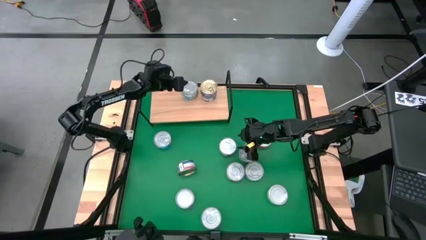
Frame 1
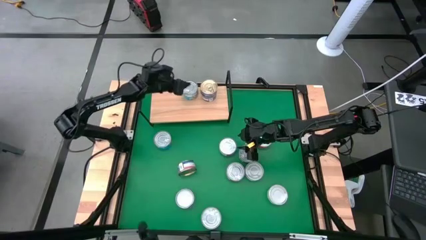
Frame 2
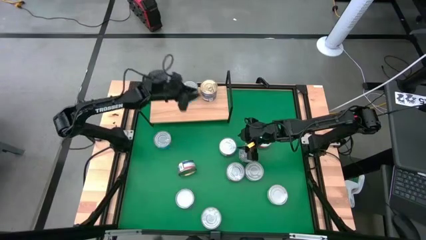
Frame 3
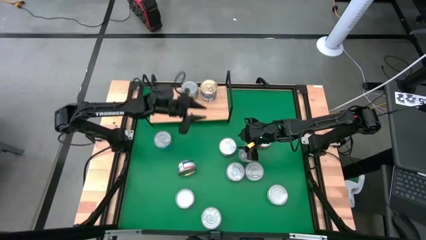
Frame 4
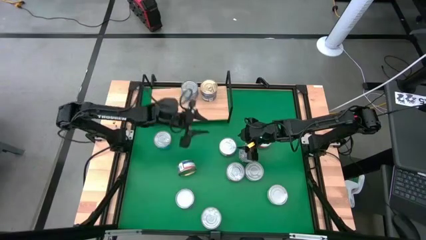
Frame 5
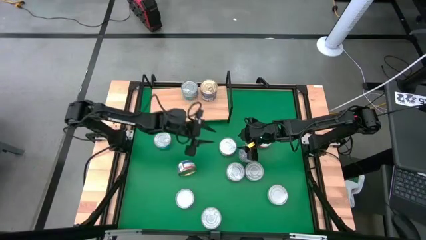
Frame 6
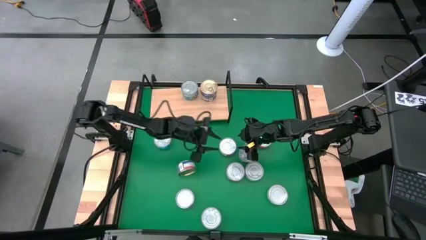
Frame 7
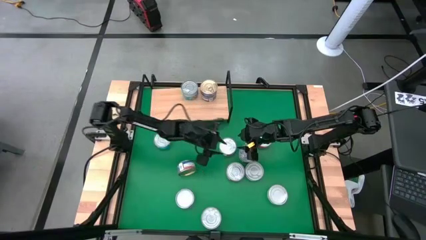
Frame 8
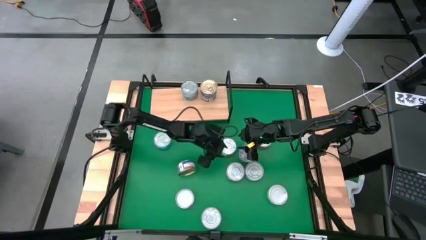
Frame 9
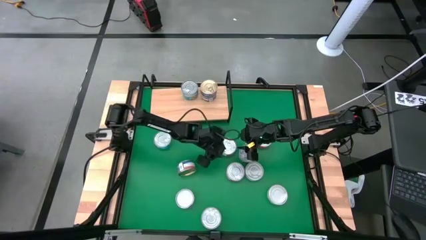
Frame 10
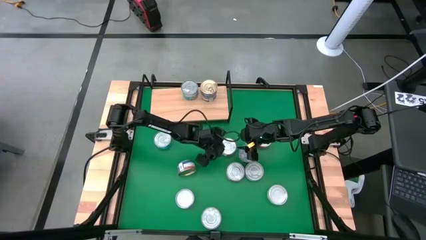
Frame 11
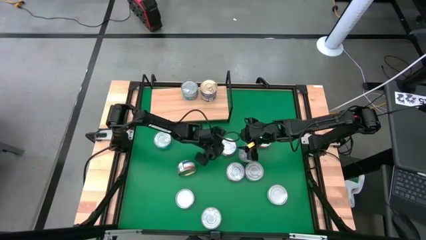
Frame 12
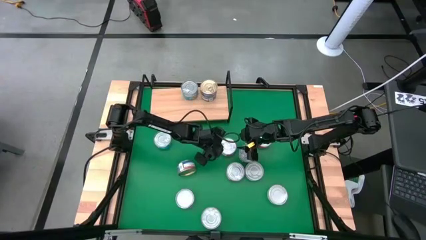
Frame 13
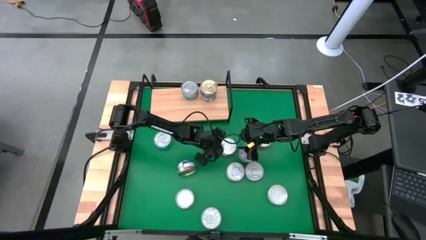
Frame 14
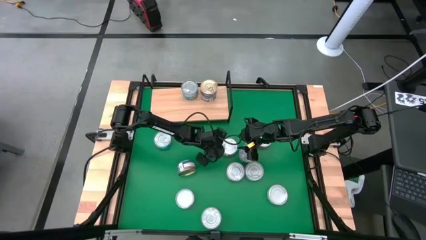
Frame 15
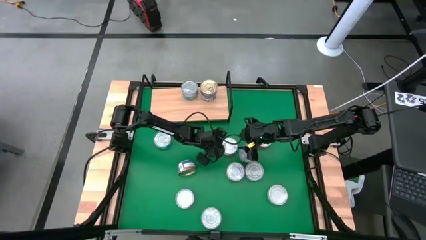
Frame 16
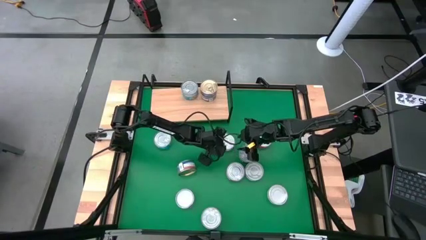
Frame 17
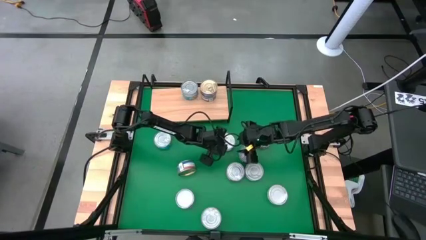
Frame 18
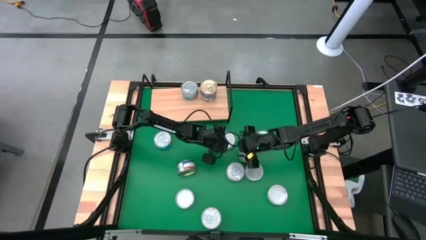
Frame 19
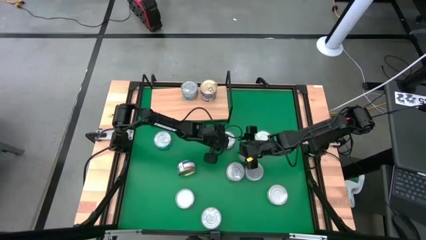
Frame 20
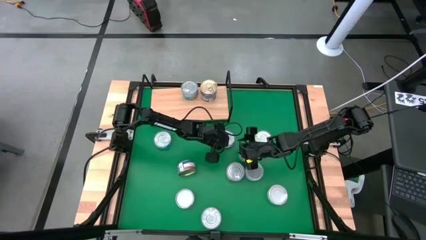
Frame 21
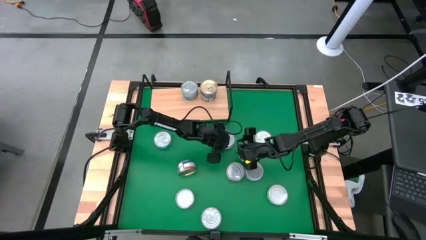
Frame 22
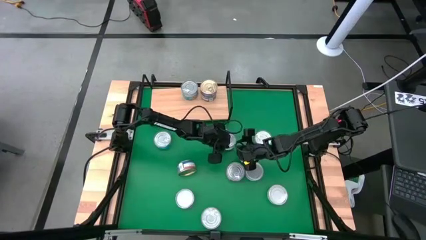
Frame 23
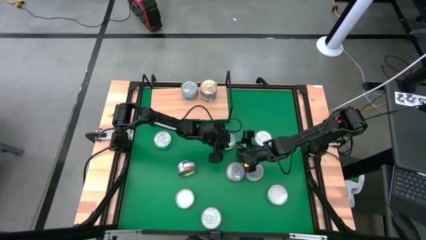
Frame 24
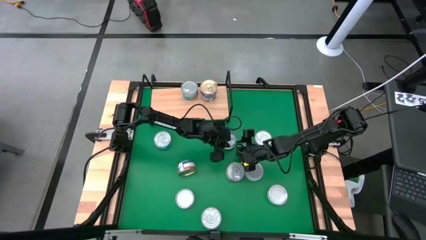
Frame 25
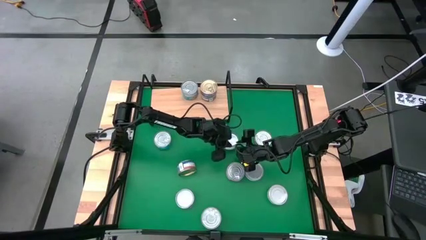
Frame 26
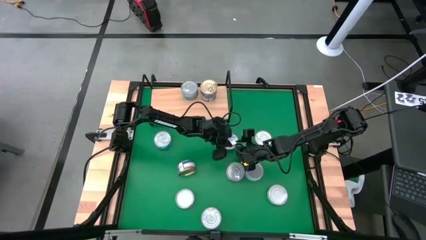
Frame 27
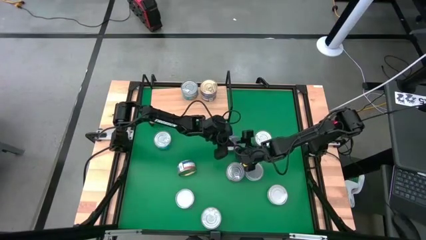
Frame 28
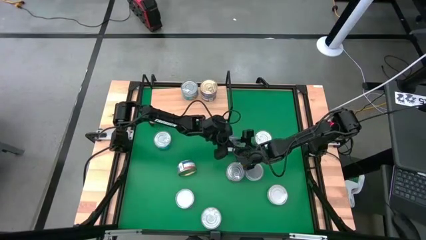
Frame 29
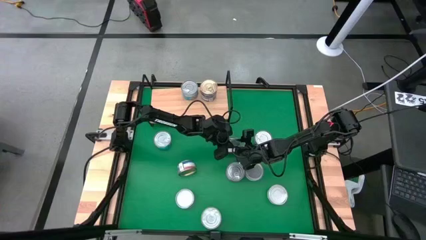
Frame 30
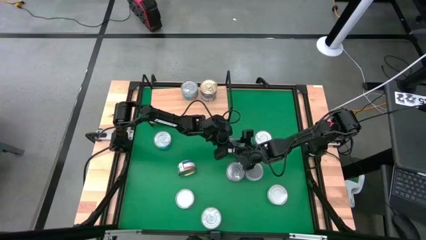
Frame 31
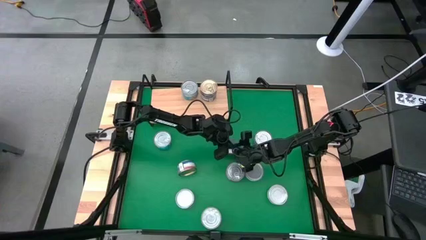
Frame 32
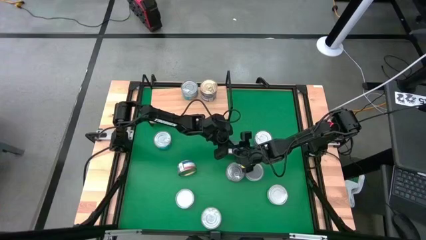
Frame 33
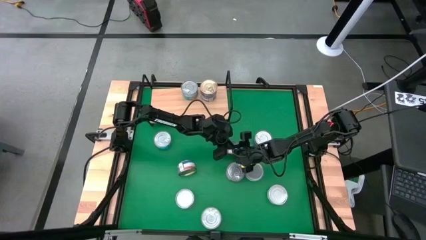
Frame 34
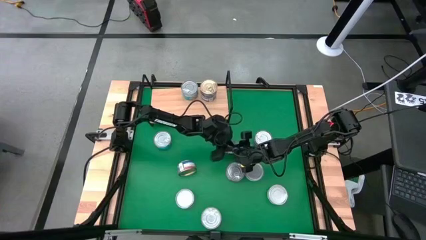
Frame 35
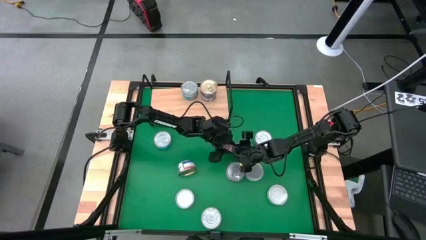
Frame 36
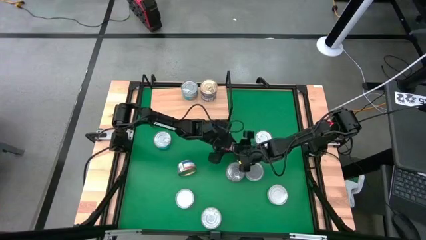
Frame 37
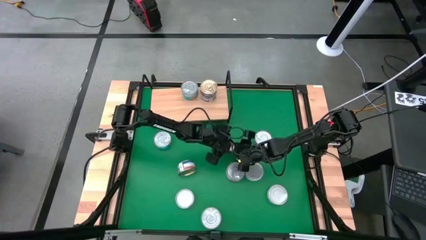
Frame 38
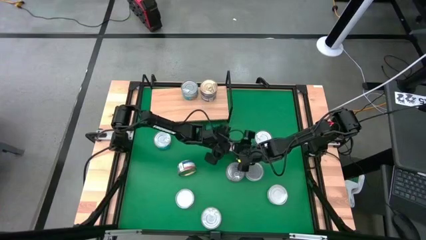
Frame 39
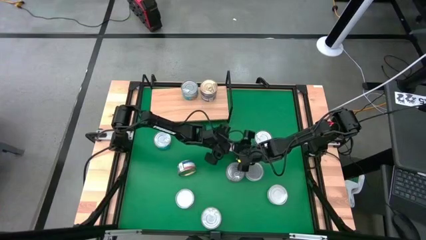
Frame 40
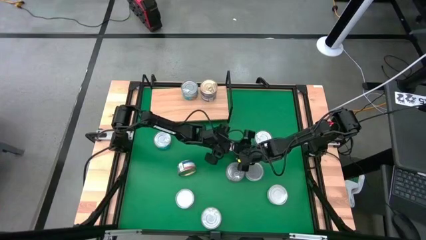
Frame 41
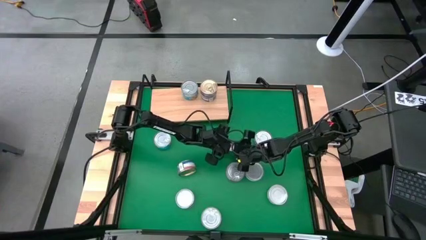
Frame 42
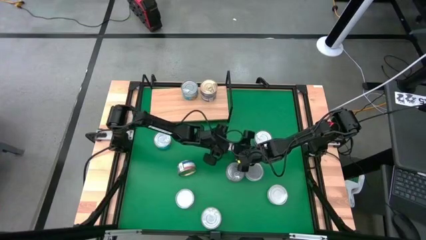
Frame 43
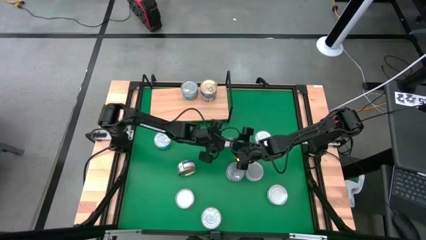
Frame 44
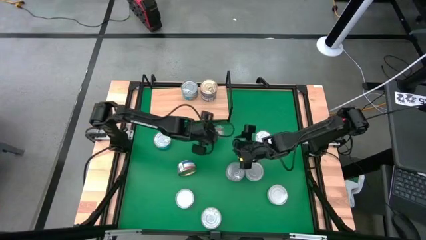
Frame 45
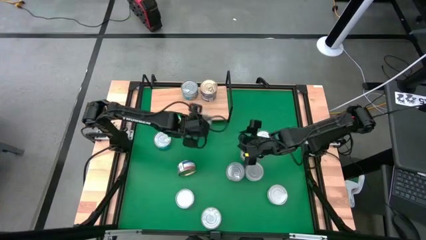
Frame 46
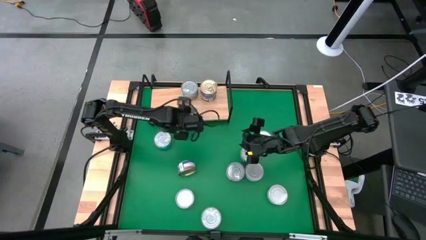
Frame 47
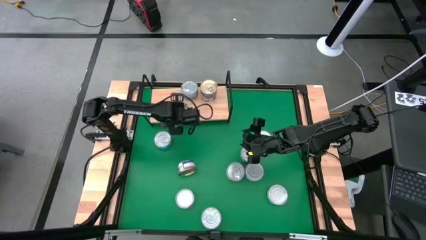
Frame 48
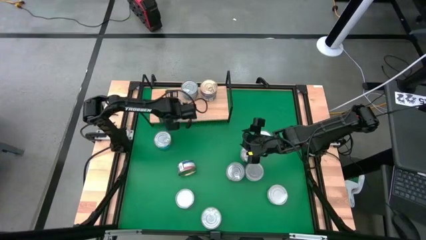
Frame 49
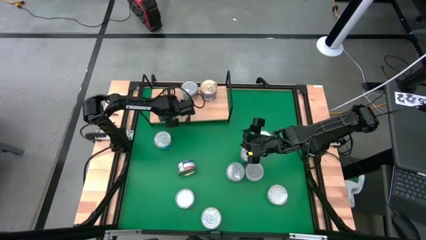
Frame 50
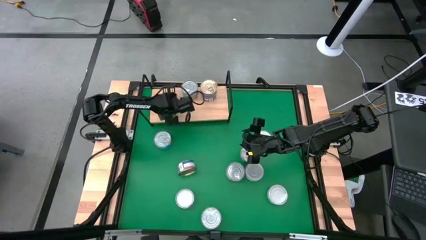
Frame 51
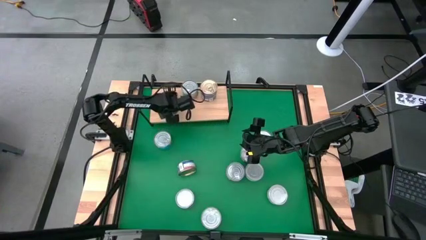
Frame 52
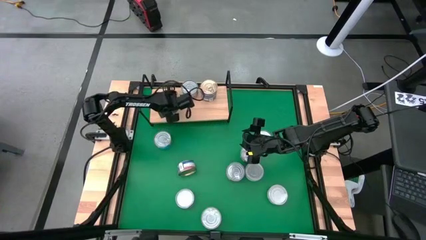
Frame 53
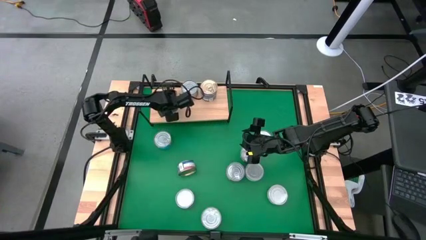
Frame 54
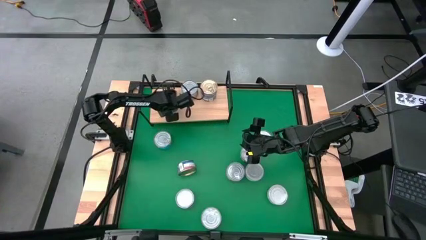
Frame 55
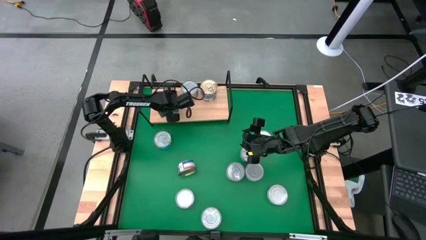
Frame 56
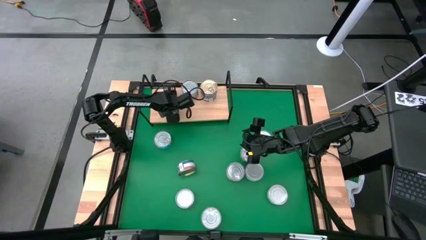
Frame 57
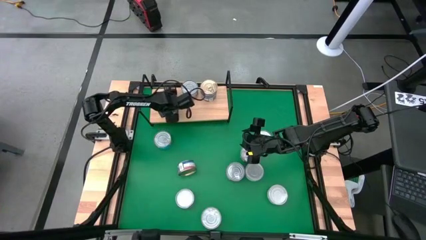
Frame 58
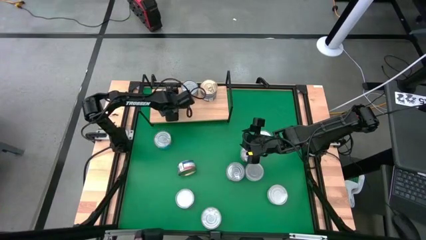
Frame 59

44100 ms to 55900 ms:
Task: Stack canned seafood by type on shelf
Put the red tuna can on the shelf

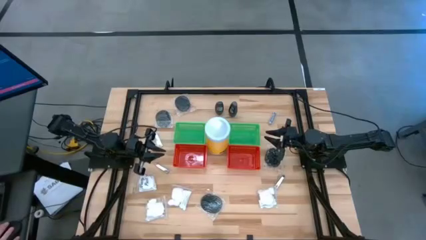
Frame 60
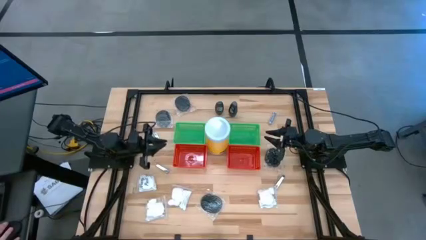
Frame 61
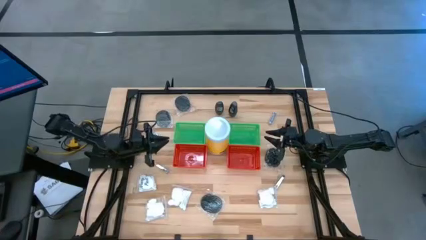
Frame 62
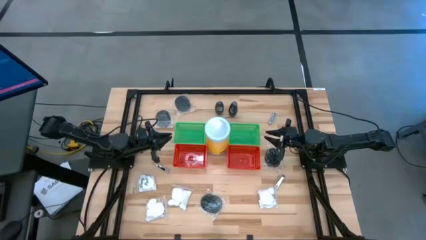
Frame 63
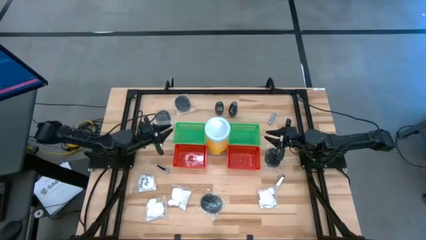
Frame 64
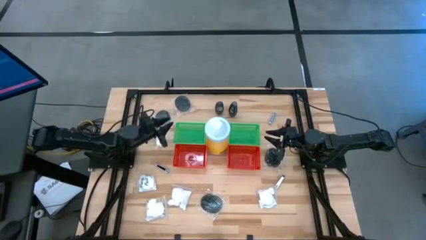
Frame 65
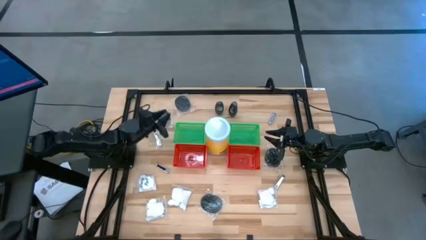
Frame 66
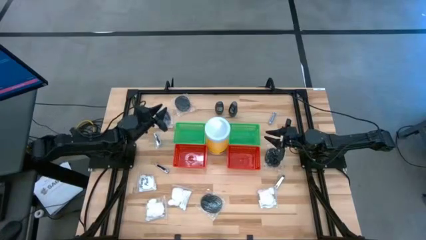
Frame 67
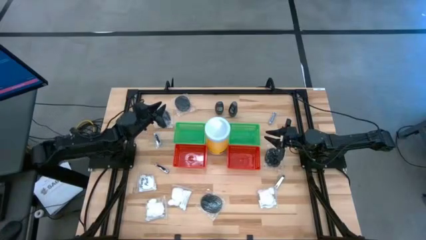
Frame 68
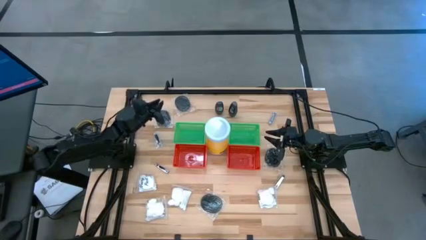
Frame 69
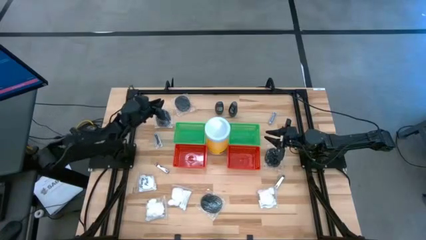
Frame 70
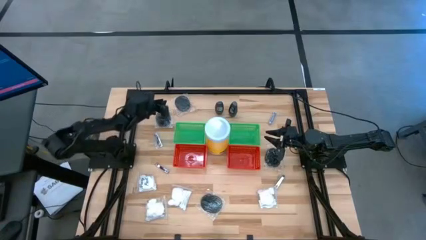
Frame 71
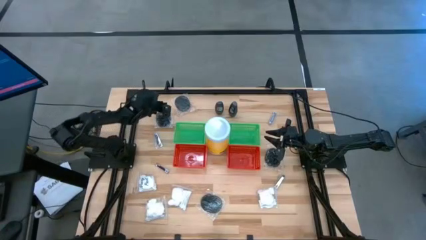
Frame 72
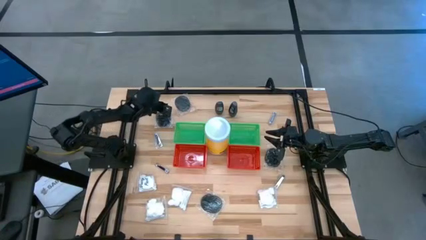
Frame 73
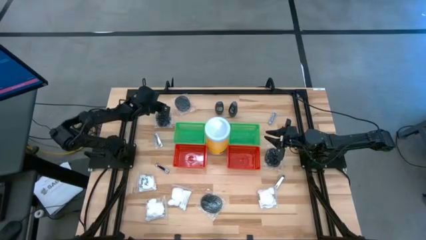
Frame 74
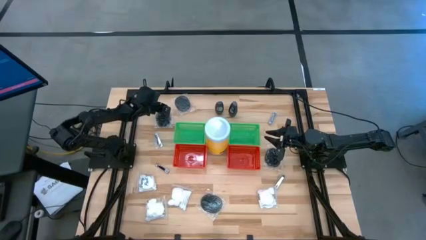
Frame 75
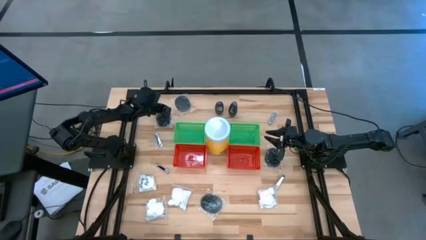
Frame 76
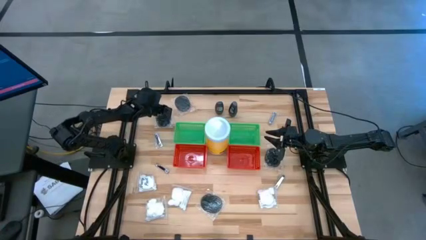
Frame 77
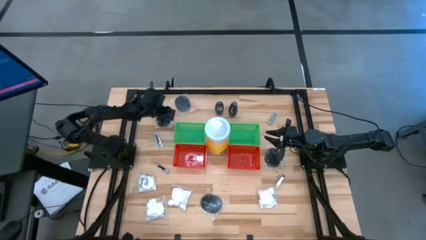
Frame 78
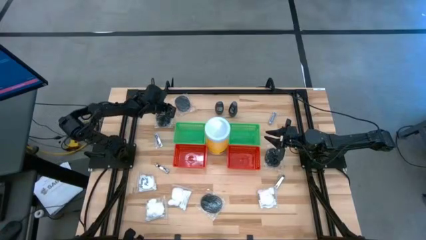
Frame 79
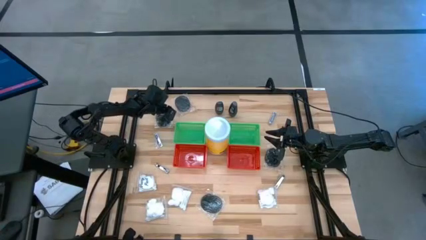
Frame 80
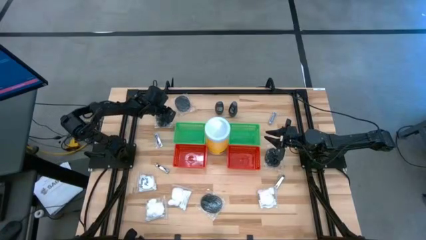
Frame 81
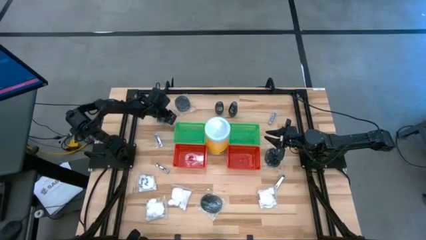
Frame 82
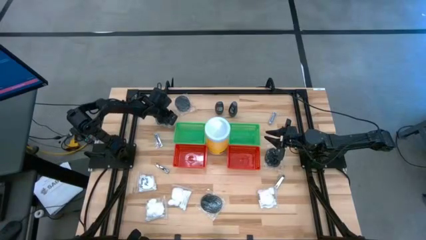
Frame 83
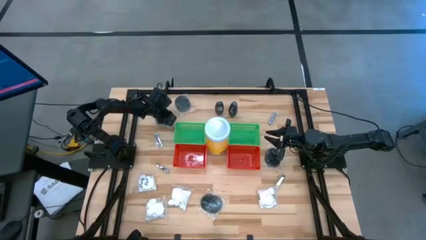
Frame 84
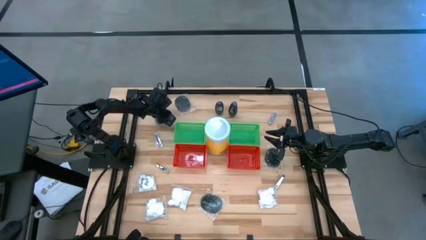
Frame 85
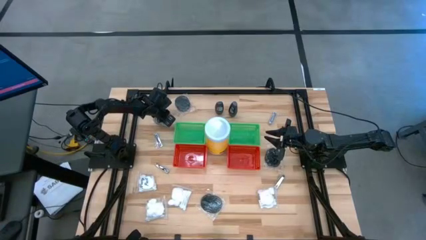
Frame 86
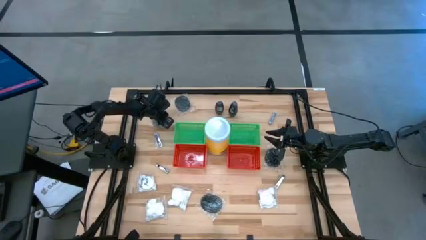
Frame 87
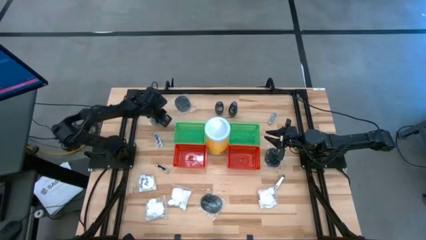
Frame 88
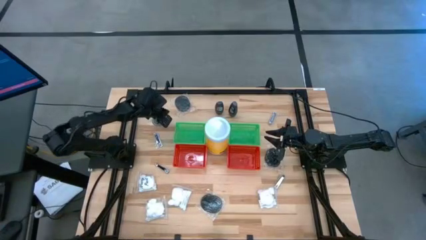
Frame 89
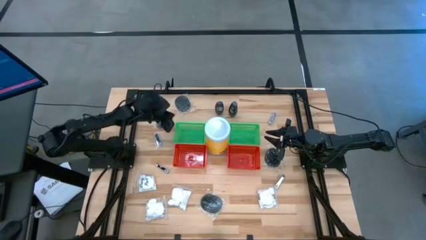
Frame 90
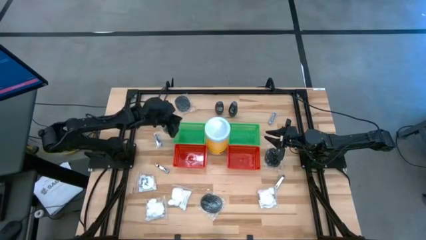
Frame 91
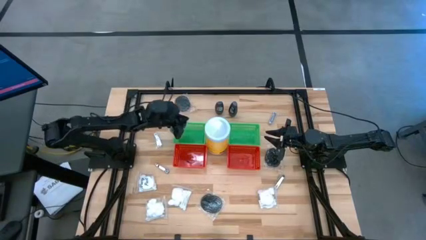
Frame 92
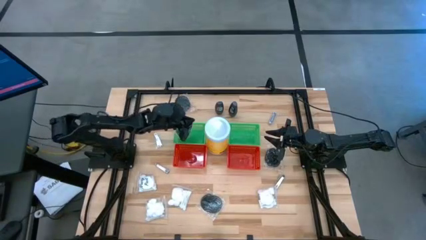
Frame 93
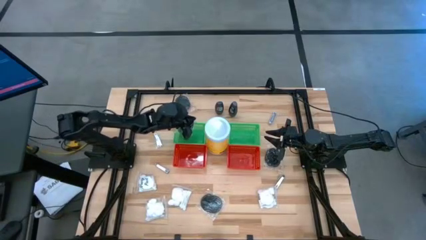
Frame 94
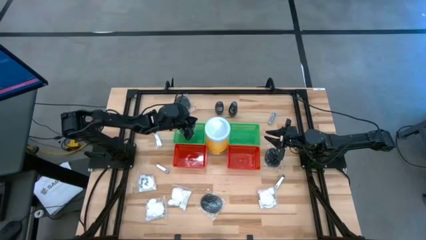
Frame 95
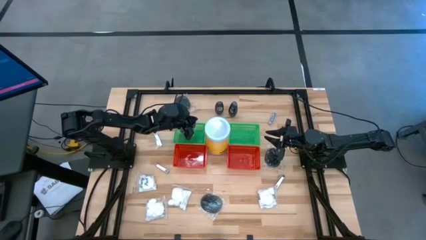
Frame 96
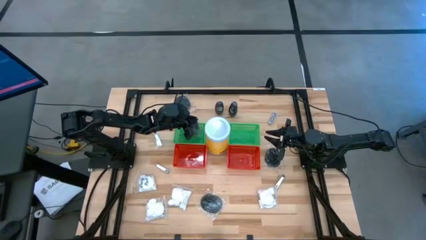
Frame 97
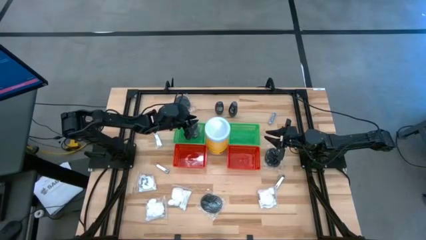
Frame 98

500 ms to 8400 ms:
Task: Pick & Place Travel size toiletries
Put the hairbrush into the left green basket
